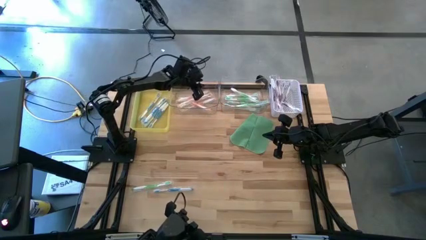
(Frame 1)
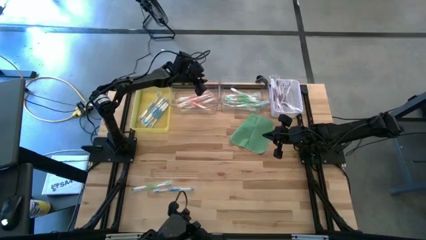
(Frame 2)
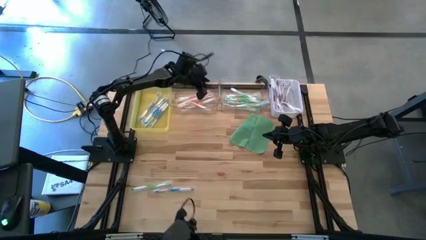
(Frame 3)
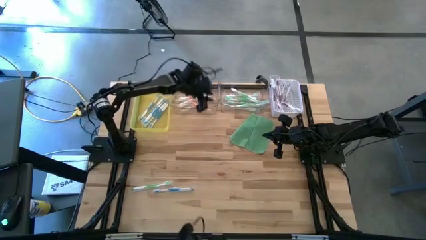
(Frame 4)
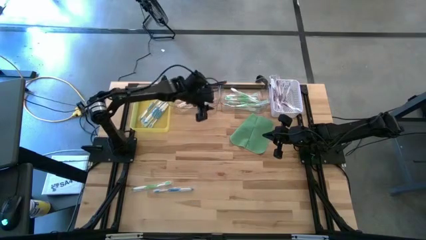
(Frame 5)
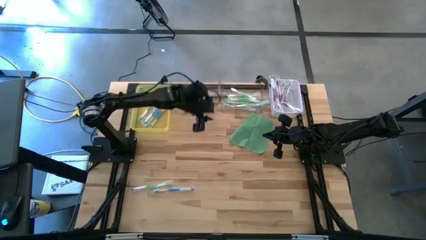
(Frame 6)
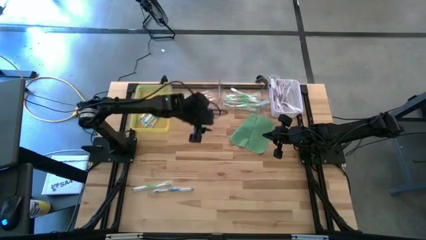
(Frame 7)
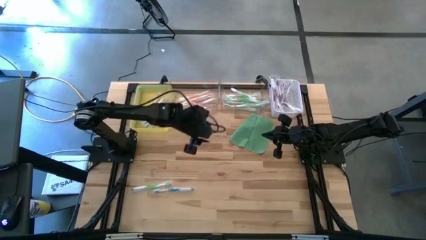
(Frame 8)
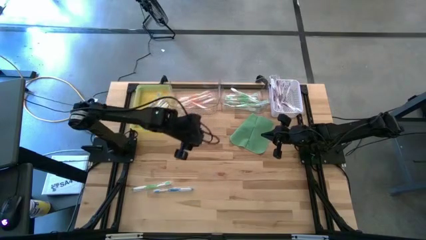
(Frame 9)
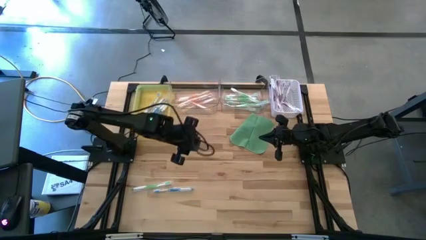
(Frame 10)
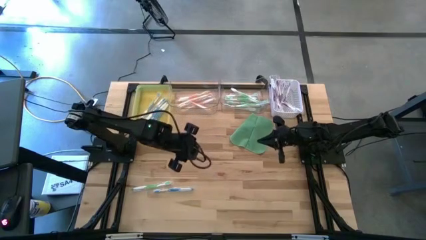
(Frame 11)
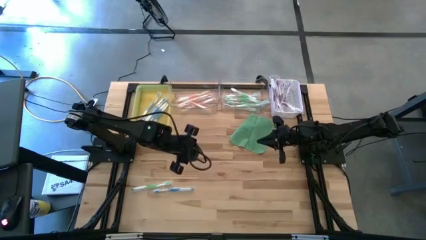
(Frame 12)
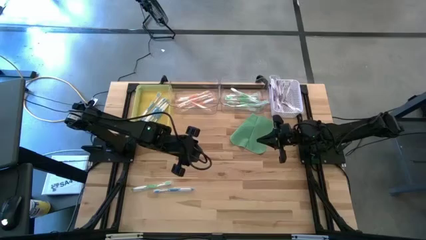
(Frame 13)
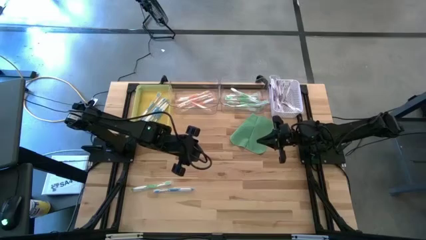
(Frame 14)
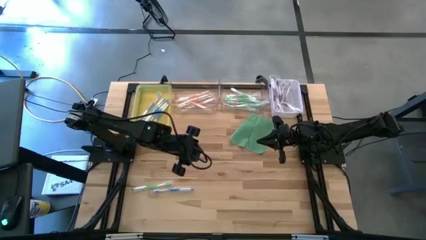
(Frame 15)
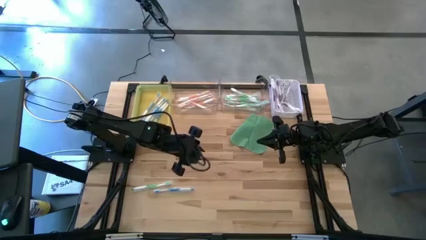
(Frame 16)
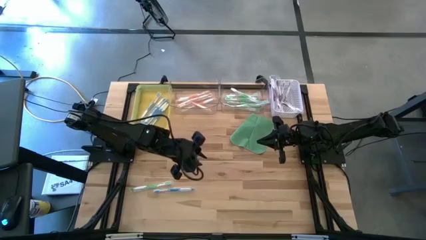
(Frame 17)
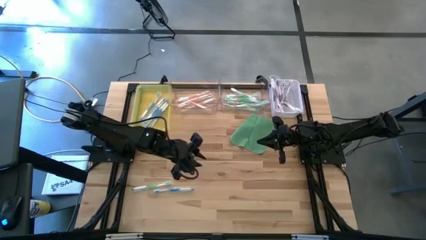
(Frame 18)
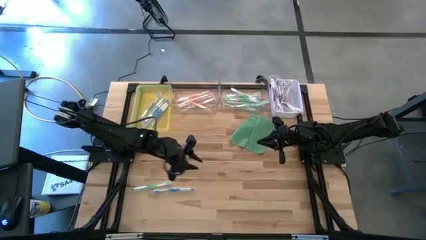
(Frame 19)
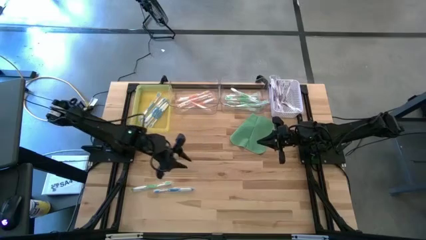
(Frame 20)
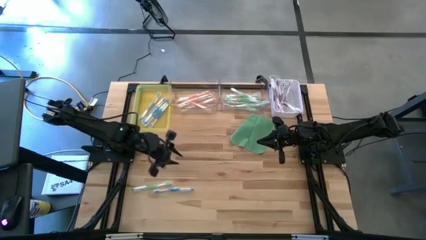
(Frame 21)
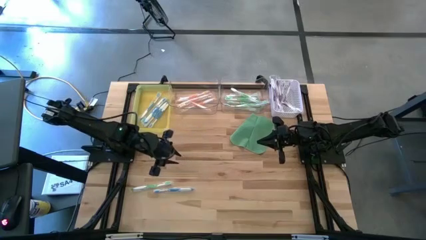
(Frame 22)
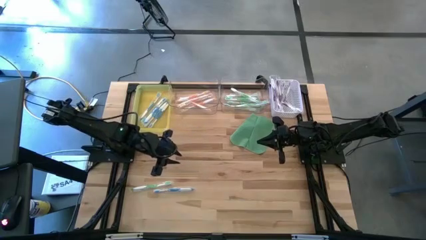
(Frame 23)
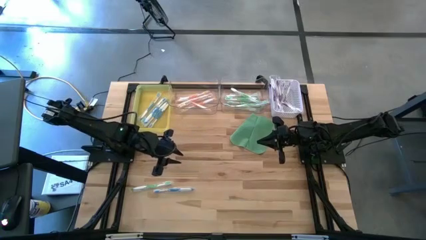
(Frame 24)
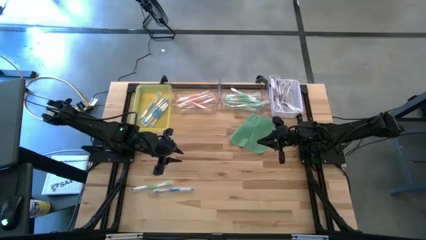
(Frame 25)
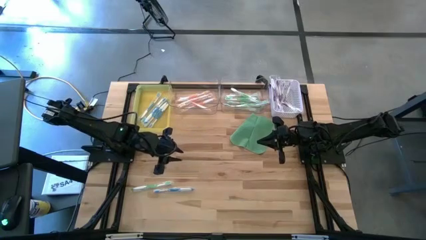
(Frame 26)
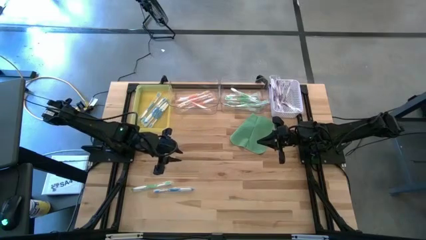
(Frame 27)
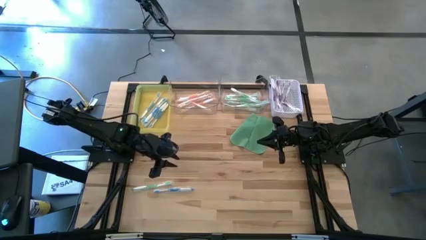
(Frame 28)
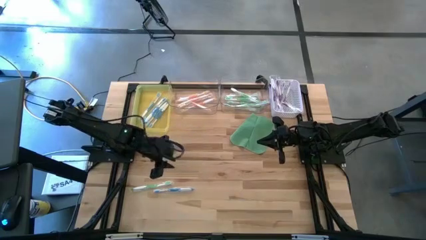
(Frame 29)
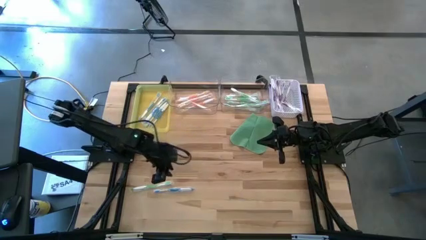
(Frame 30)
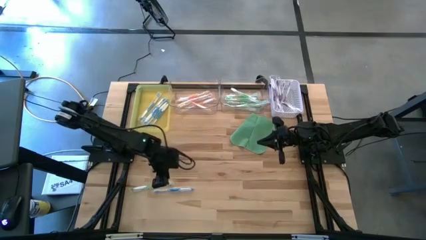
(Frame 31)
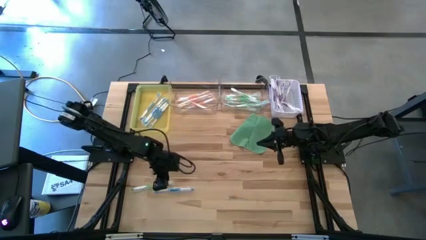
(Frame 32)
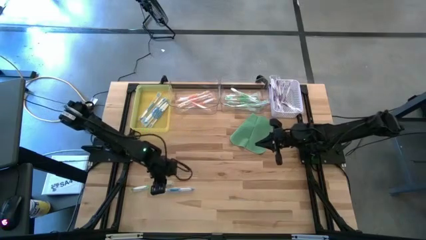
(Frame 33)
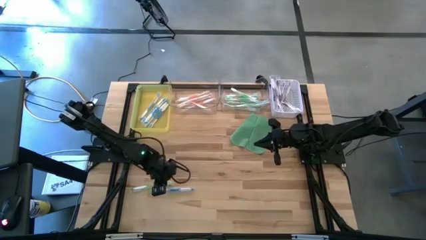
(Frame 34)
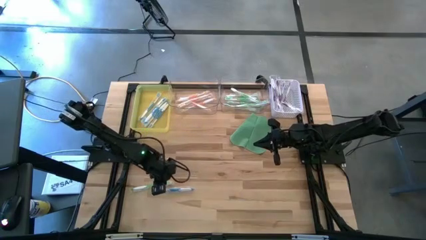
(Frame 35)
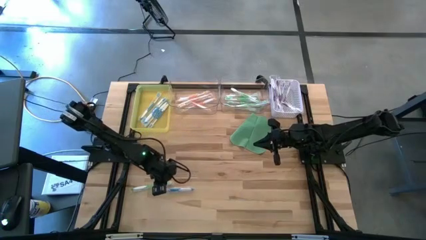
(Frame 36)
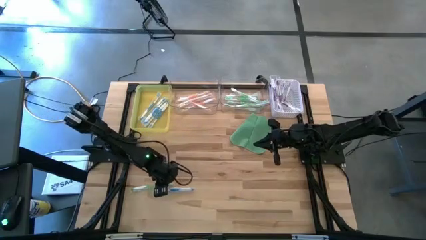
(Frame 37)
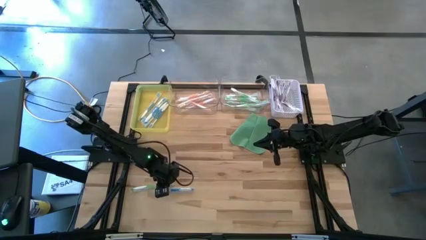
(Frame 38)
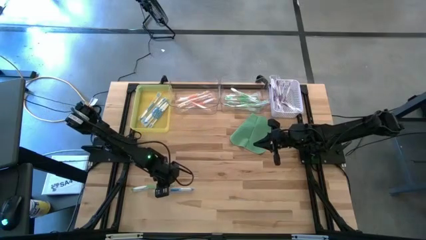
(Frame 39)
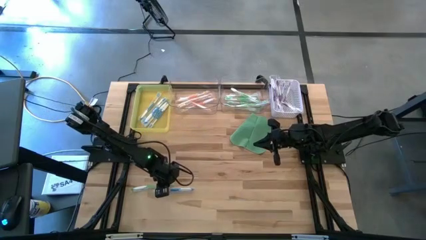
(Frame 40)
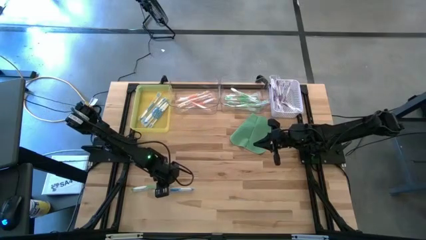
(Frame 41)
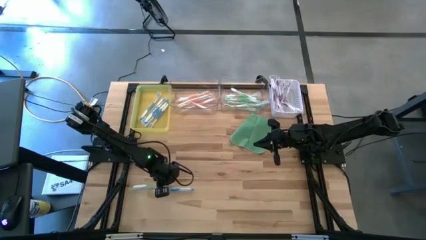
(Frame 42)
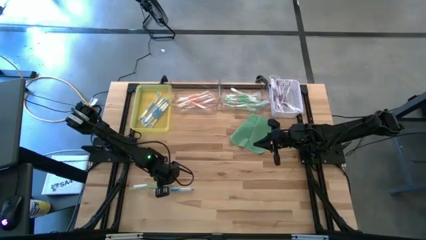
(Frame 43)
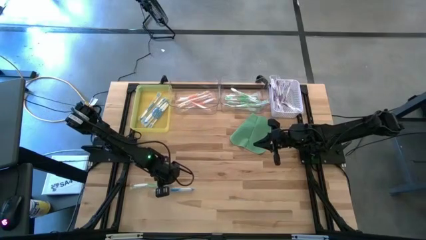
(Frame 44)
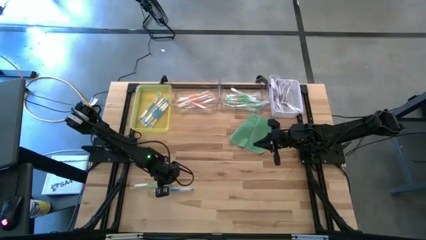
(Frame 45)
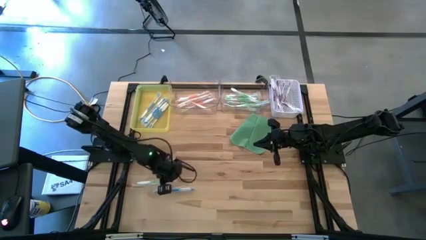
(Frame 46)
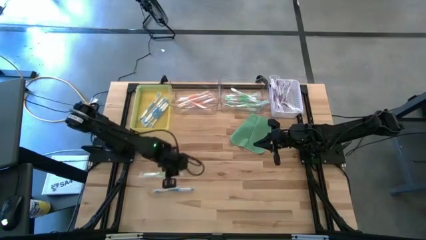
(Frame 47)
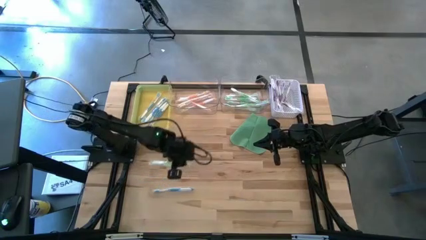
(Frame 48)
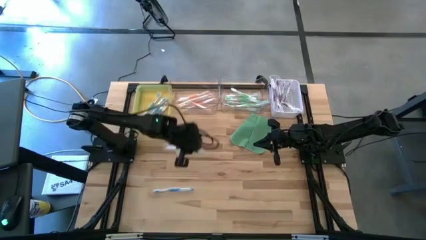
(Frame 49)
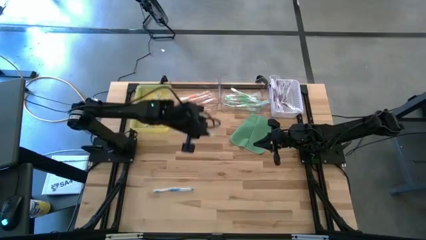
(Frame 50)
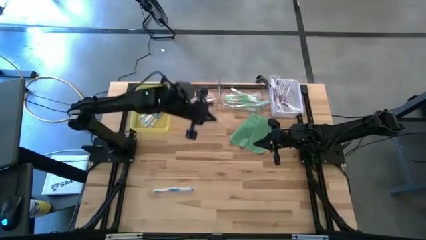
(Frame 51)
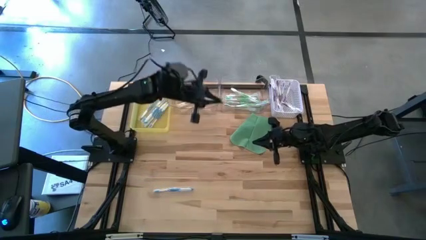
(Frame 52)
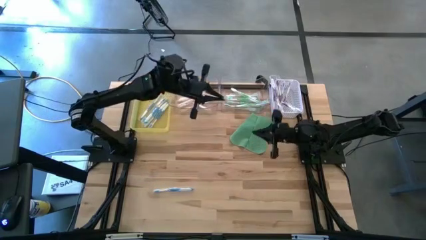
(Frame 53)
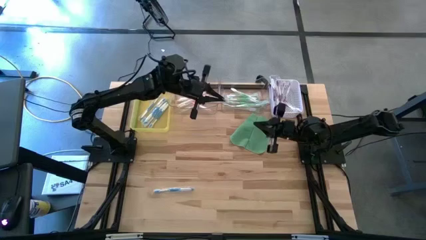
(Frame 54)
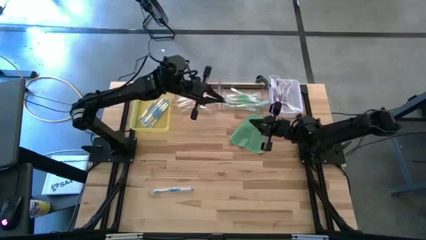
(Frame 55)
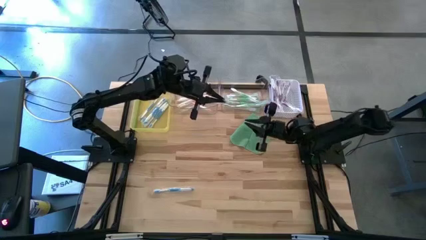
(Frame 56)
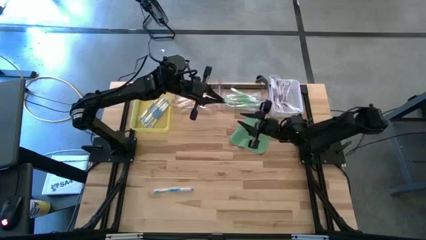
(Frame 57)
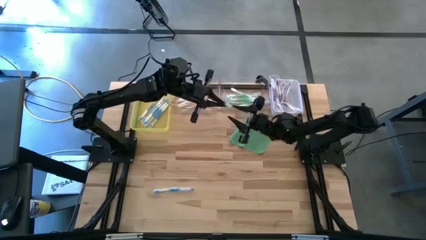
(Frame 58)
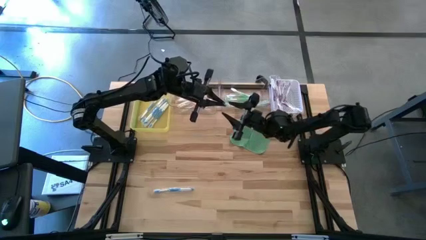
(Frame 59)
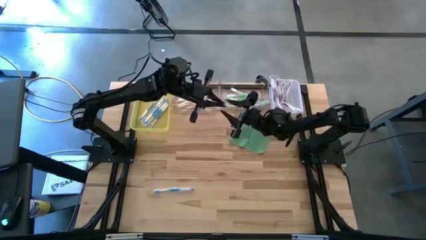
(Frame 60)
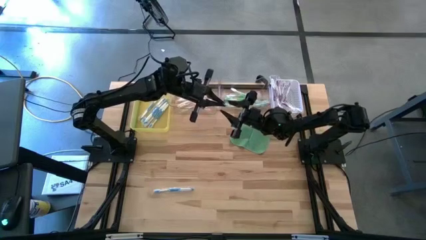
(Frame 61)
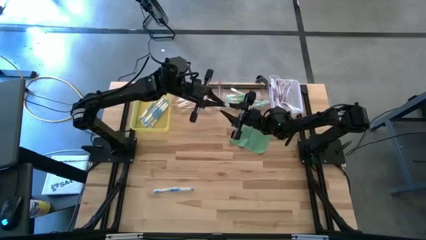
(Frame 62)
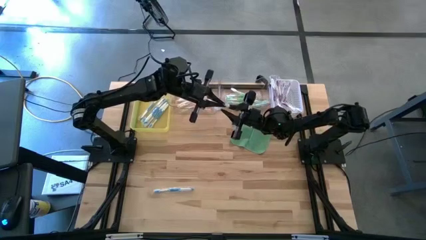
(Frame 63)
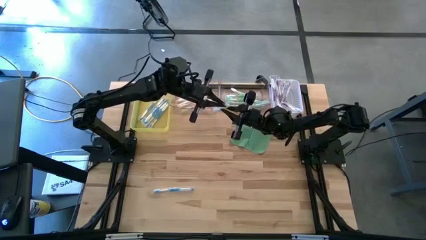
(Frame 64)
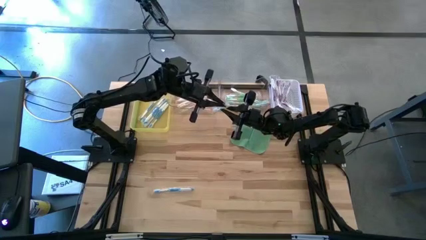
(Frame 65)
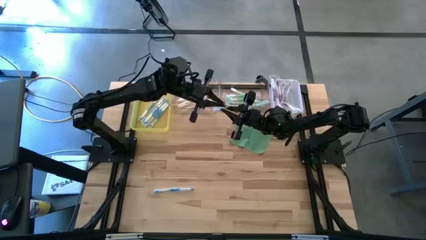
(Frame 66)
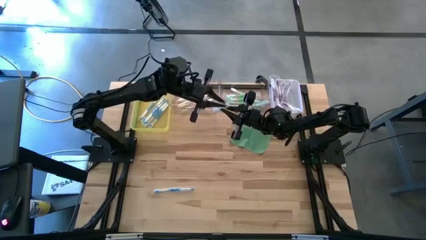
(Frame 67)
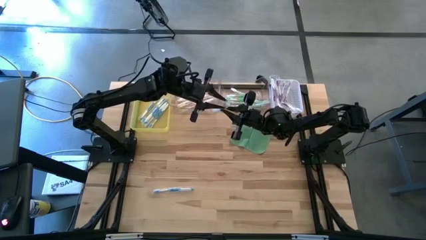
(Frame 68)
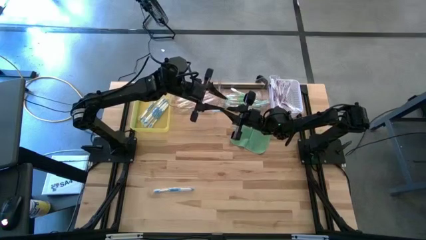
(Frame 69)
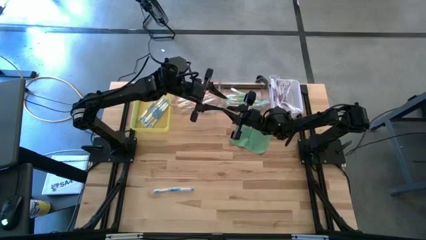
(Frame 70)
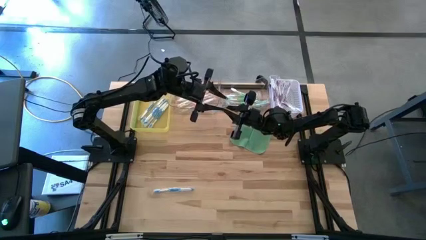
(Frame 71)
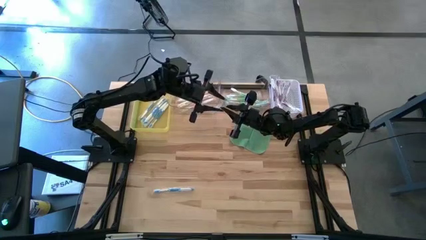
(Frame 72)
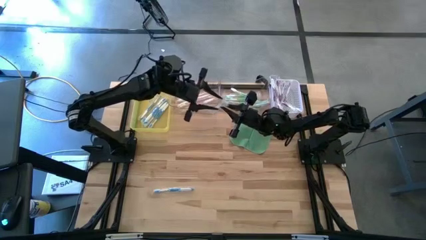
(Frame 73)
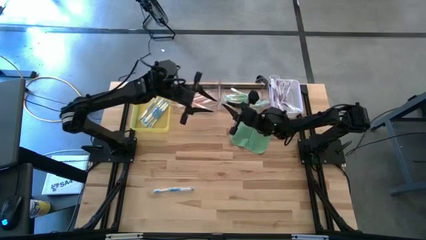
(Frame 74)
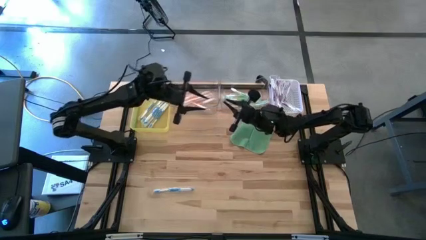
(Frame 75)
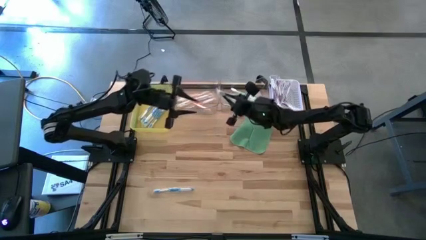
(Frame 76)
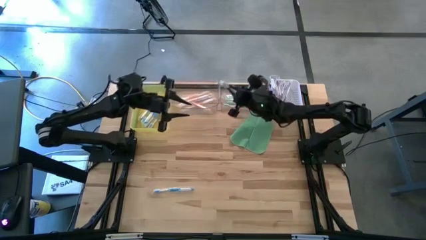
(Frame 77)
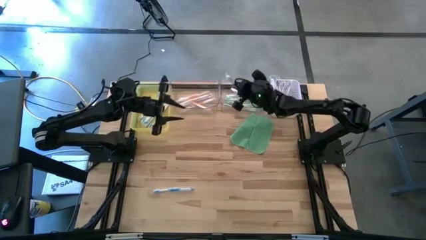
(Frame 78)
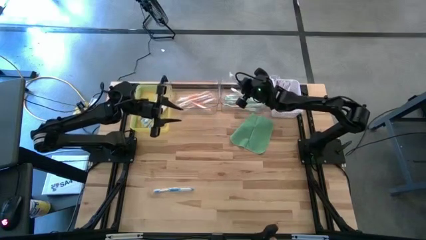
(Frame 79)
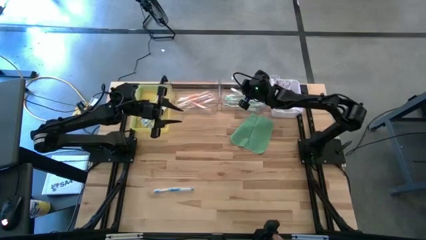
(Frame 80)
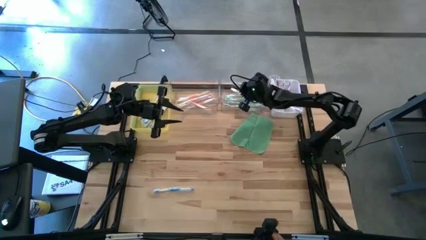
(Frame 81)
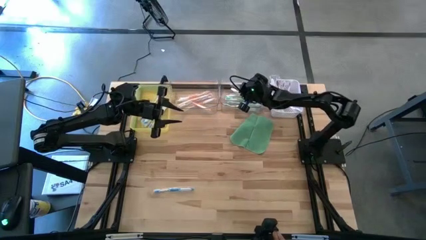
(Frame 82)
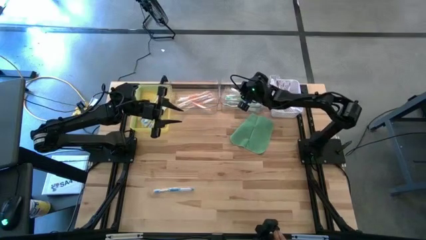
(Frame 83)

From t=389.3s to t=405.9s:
Task: Pick & Place Toothbrushes
Put the green toothbrush into the right transparent bin
